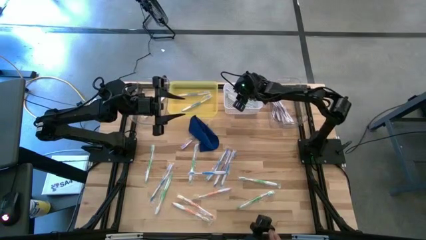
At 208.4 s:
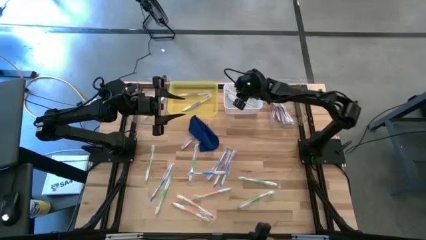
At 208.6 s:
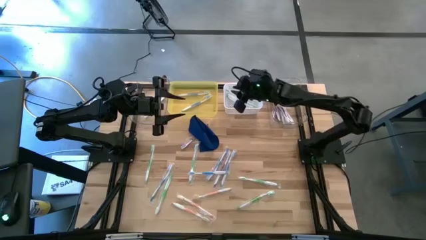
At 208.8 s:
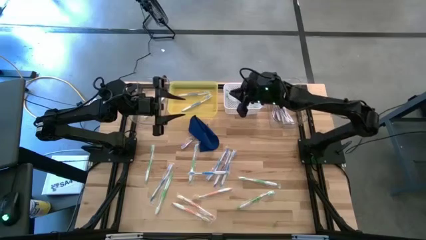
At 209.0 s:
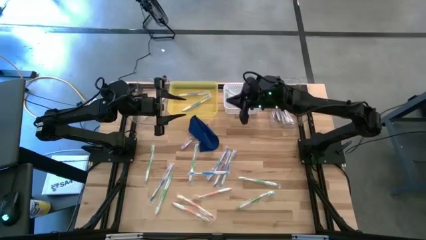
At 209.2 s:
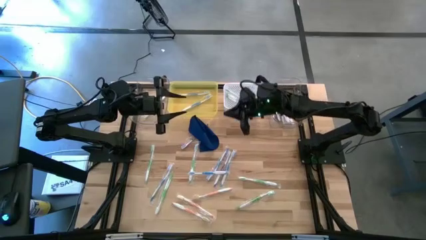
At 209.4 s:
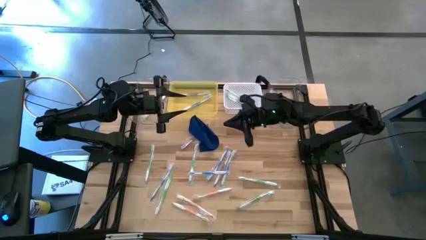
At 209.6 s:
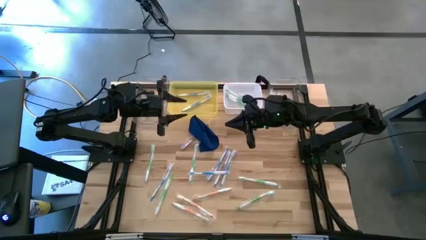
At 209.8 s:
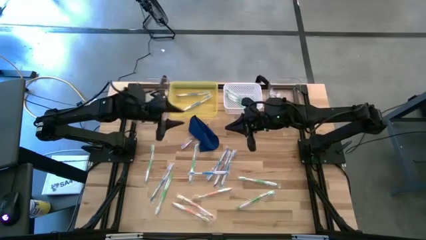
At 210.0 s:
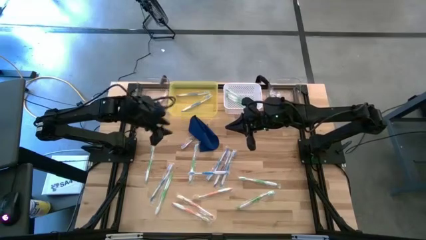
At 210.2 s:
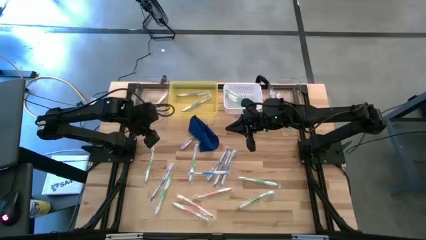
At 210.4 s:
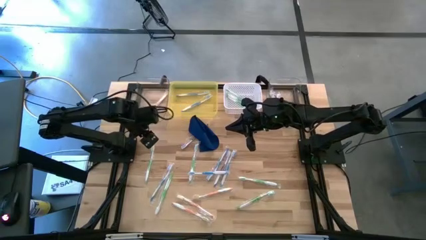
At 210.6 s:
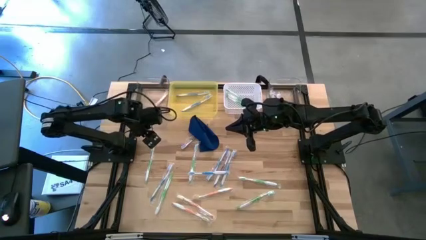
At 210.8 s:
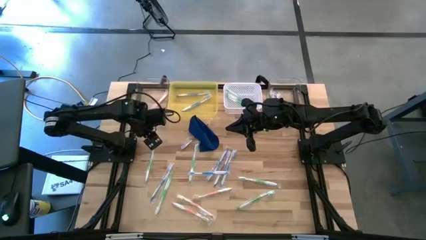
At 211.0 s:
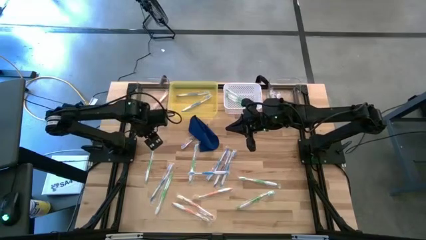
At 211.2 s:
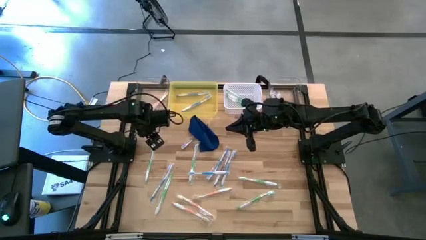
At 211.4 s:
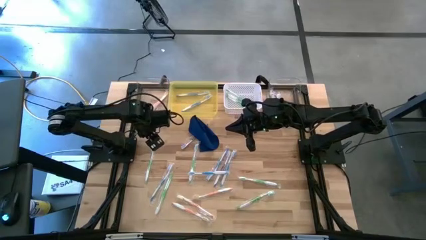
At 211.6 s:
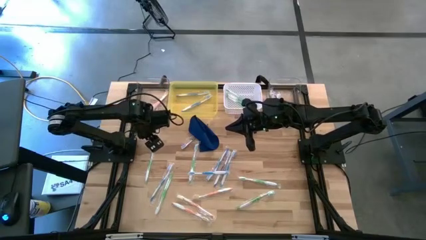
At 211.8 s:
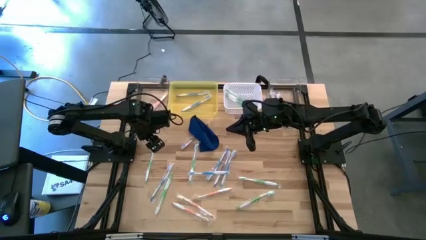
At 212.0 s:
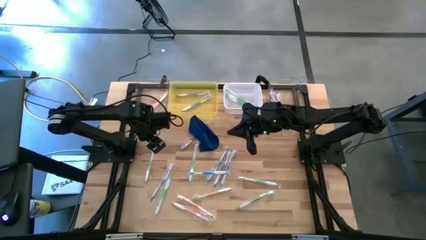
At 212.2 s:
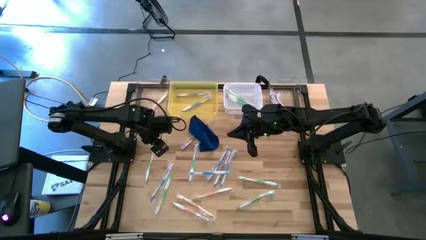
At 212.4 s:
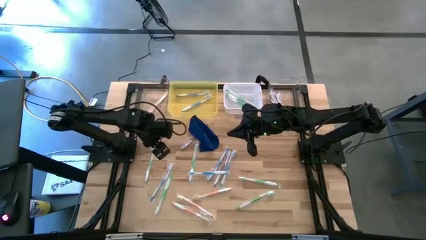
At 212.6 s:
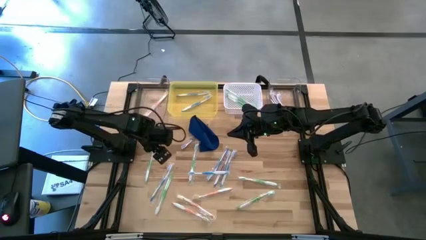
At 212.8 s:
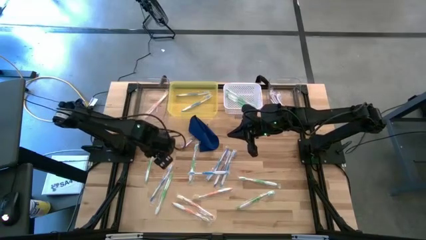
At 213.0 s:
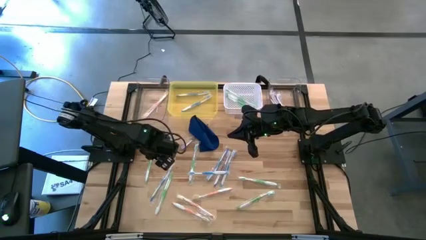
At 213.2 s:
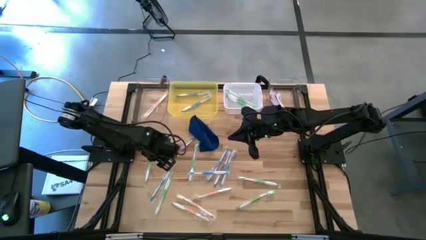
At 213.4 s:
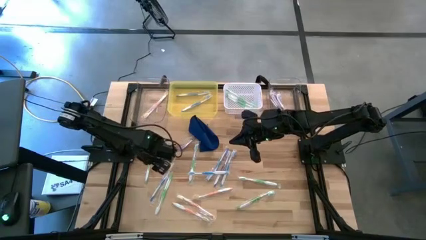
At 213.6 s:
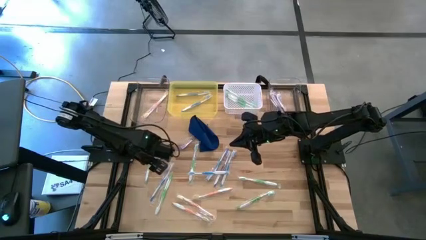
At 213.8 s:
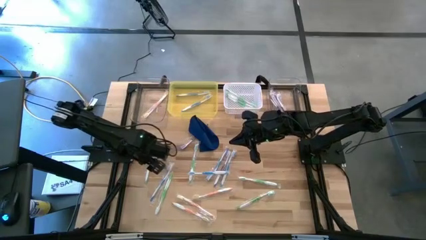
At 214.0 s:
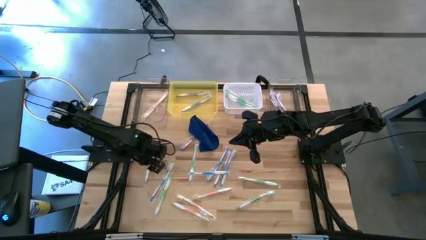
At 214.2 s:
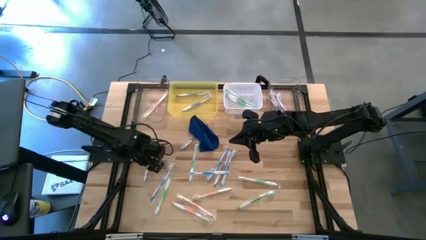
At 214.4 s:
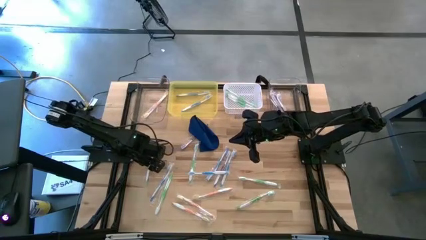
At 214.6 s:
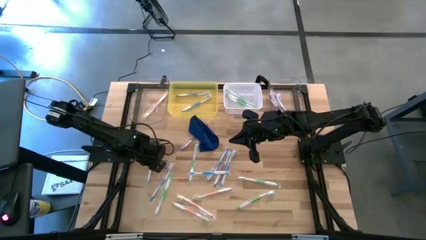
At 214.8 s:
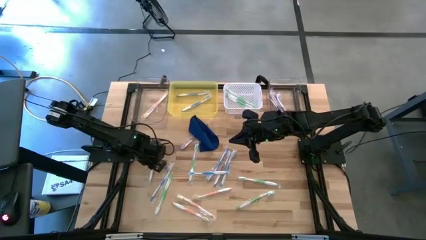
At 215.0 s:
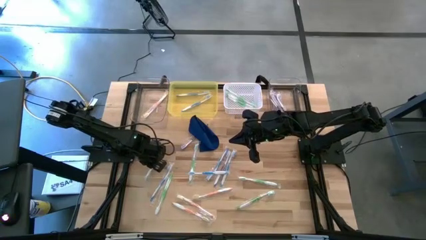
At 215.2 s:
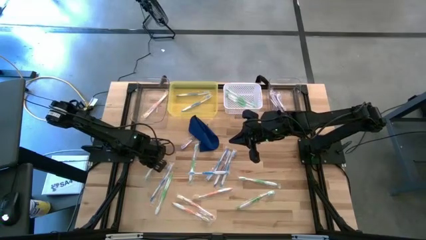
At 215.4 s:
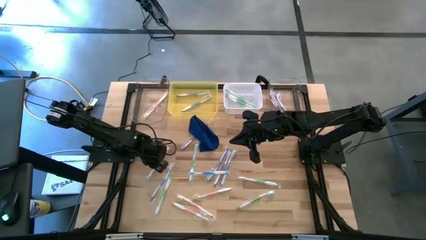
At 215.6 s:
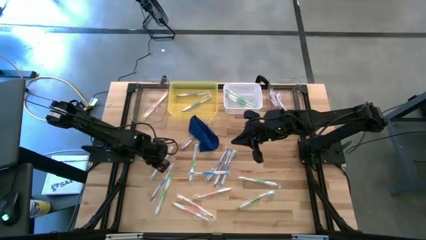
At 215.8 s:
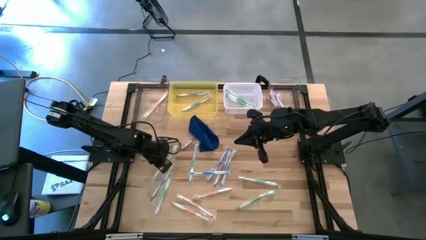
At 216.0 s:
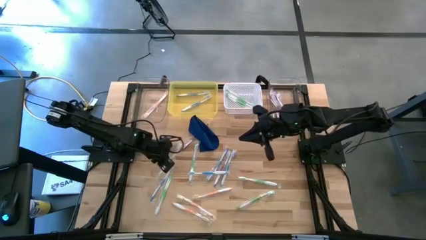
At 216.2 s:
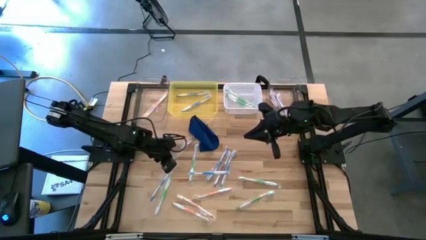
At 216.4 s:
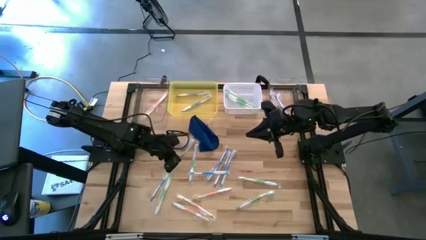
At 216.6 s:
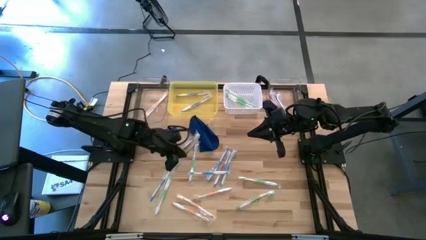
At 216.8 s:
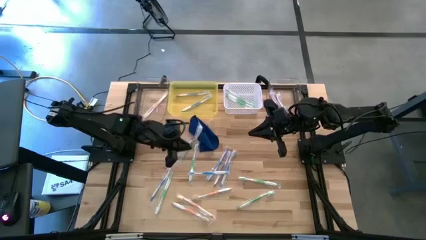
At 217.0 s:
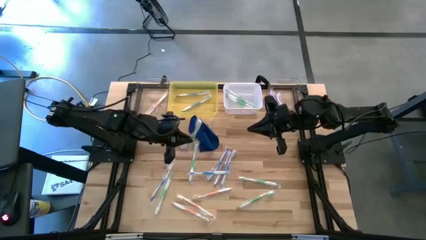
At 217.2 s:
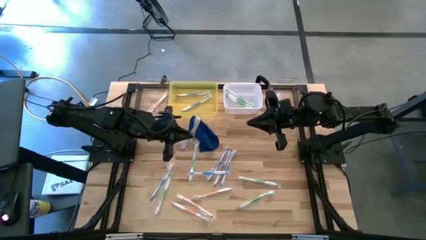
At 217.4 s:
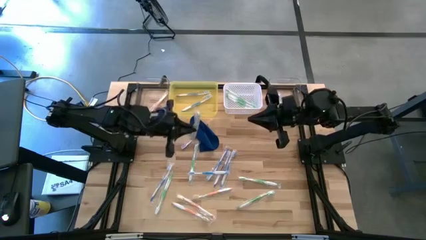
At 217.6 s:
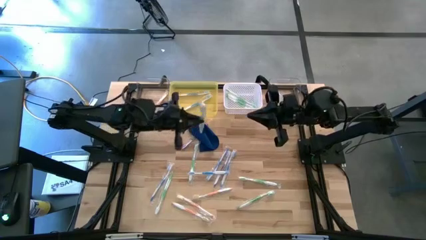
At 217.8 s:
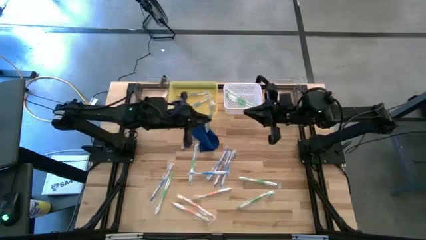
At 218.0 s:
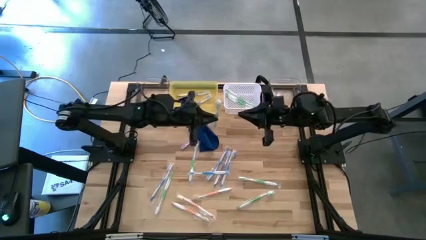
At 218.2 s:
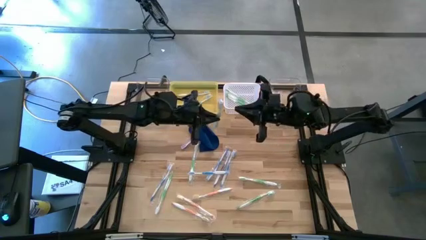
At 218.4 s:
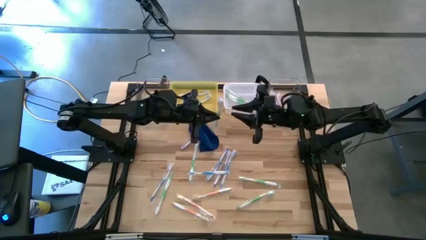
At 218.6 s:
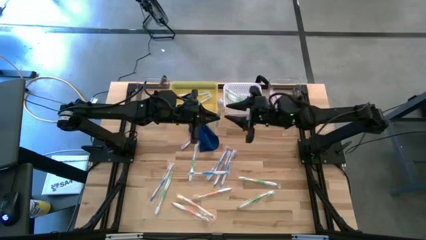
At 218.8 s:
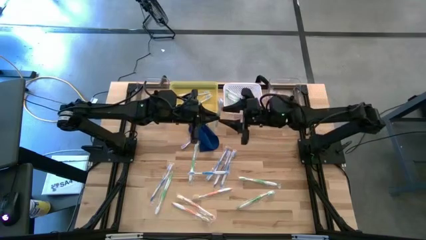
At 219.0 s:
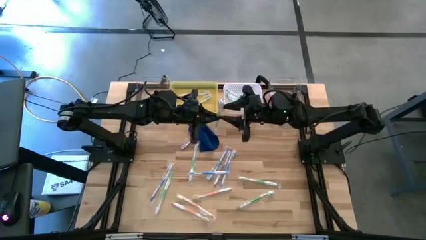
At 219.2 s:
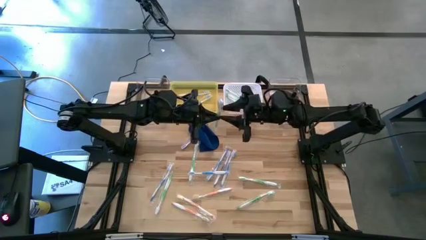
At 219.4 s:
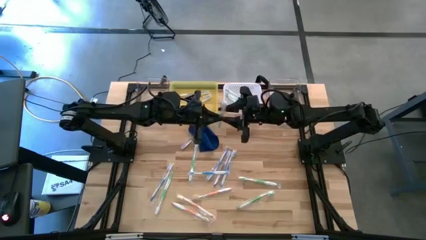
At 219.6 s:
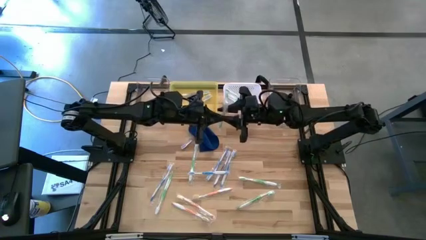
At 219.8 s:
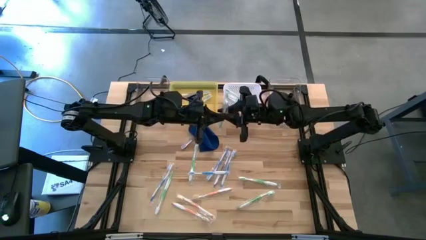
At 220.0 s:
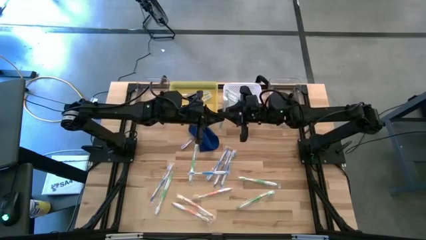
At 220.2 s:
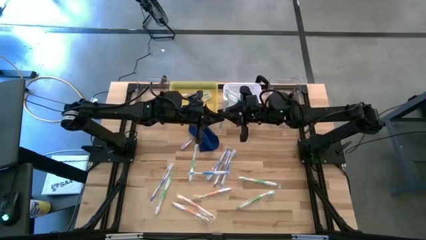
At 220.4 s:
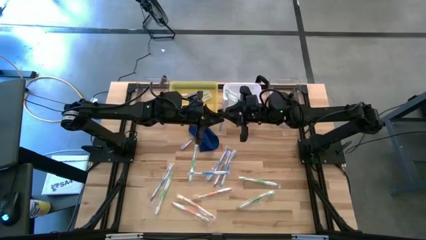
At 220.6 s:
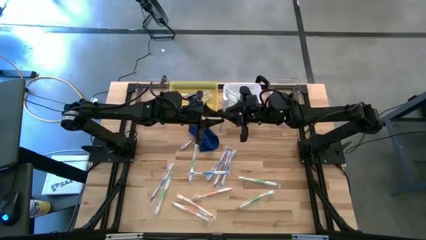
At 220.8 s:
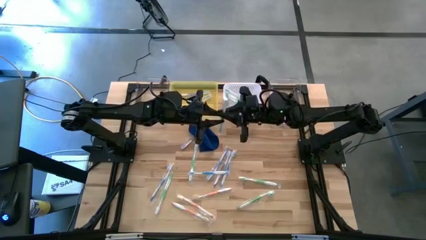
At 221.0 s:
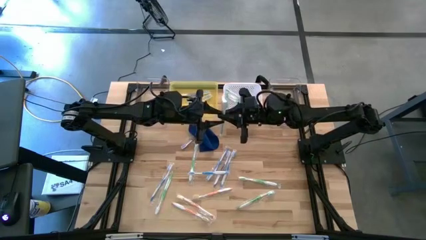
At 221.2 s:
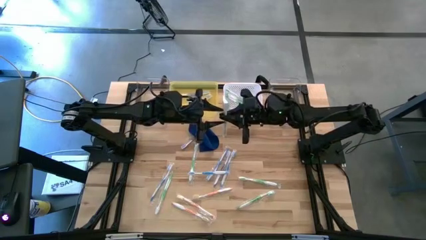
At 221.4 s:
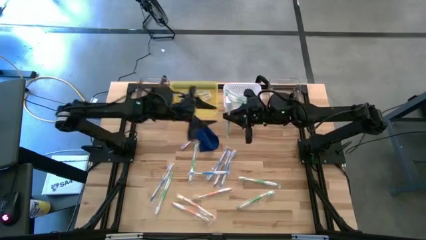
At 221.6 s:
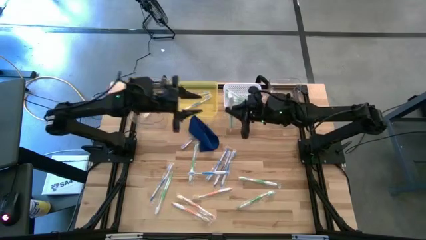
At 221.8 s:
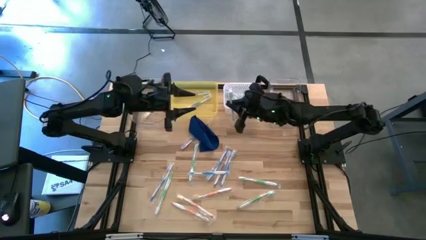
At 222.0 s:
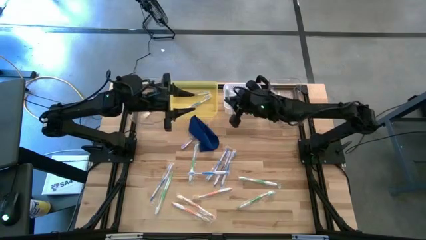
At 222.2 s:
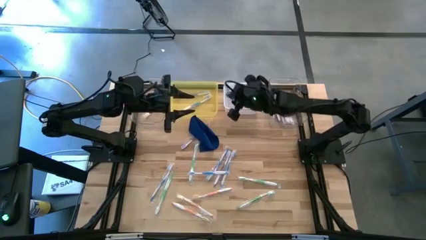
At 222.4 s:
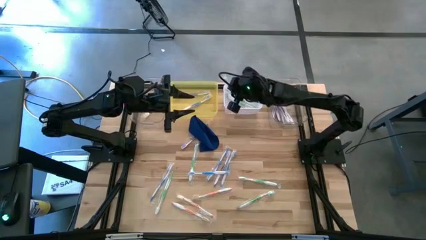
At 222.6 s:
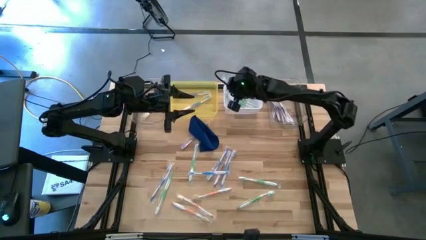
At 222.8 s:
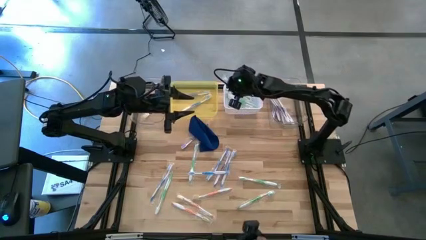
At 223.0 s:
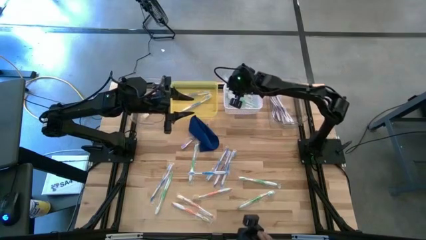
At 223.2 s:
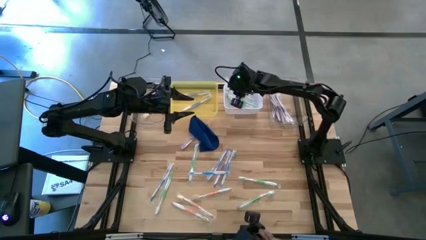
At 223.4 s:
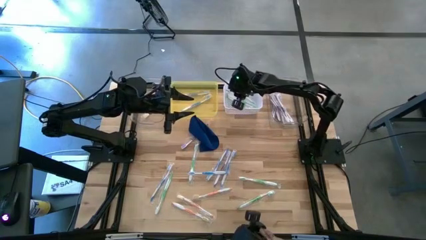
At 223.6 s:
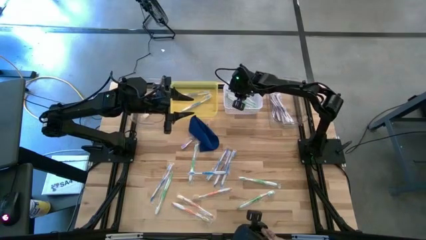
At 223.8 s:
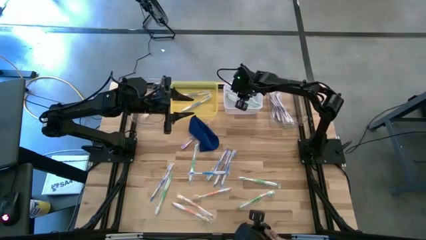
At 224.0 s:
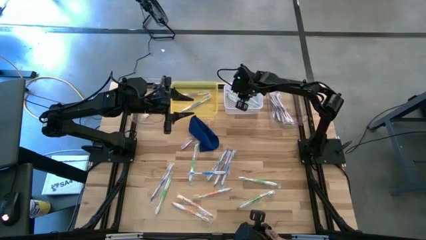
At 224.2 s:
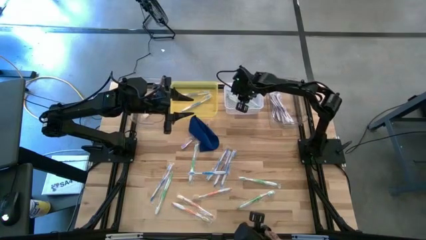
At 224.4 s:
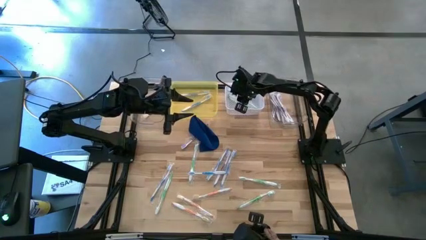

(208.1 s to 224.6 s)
Task: Pick & Place Toothbrushes
Put the green toothbrush into the white bin
